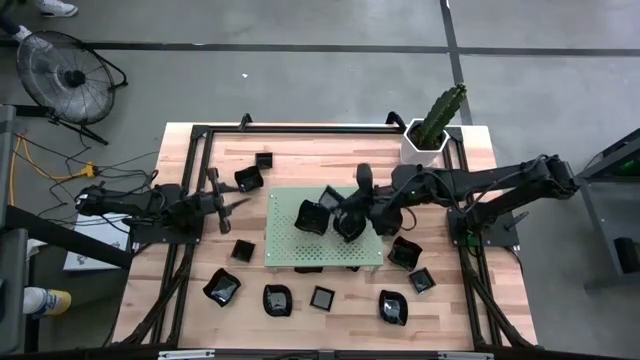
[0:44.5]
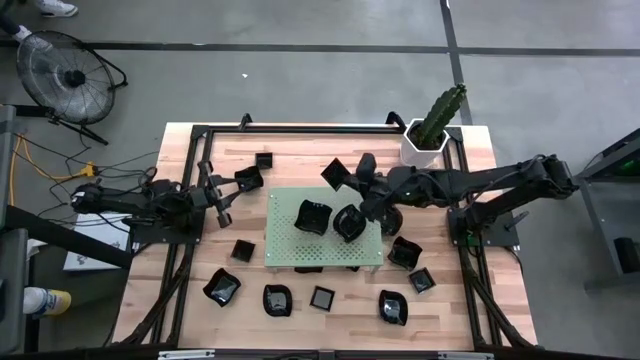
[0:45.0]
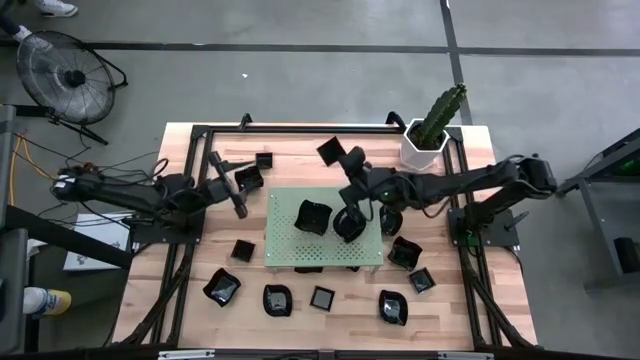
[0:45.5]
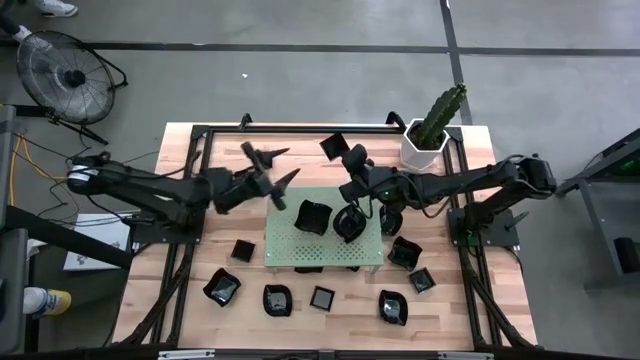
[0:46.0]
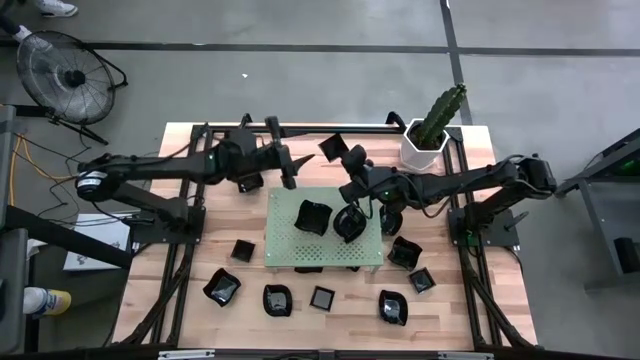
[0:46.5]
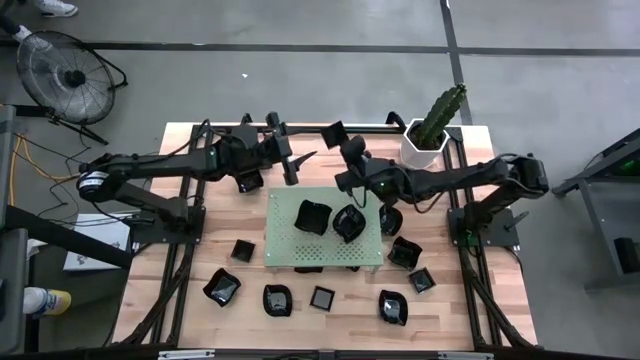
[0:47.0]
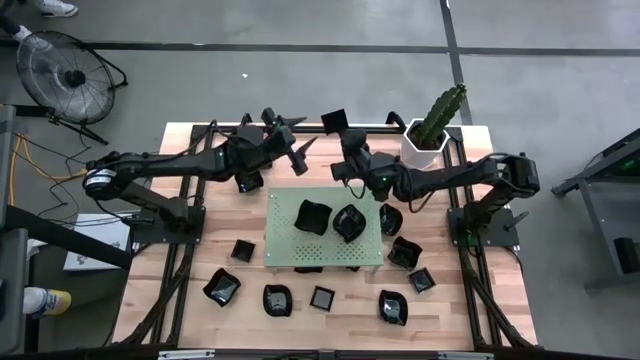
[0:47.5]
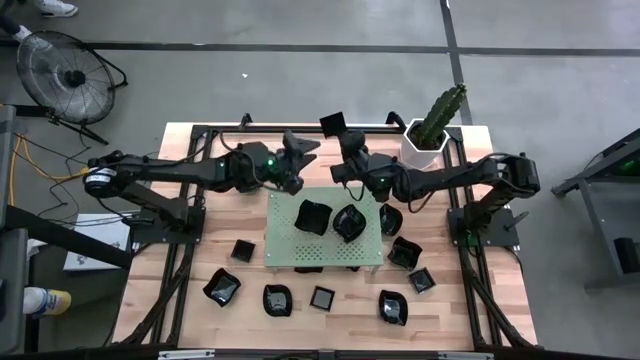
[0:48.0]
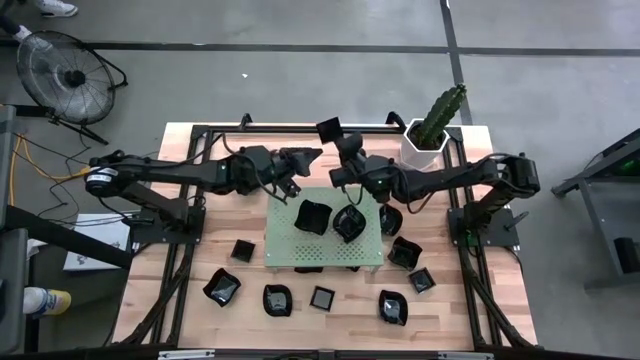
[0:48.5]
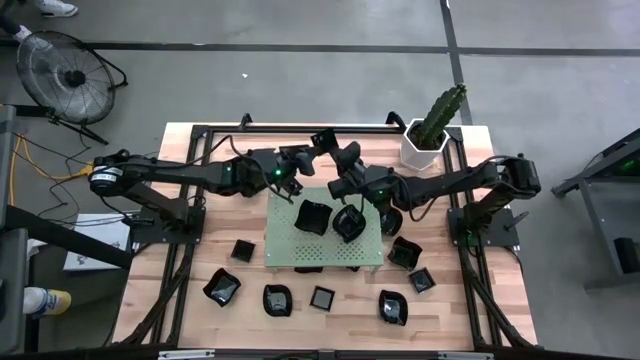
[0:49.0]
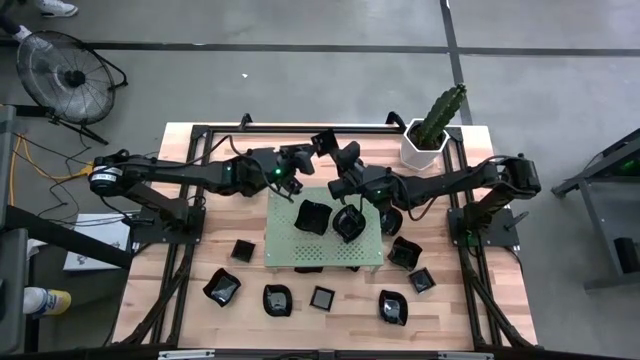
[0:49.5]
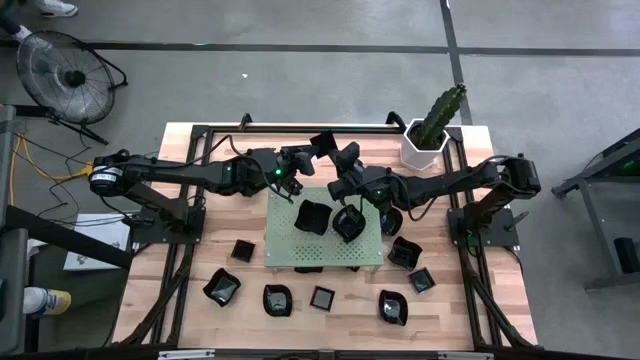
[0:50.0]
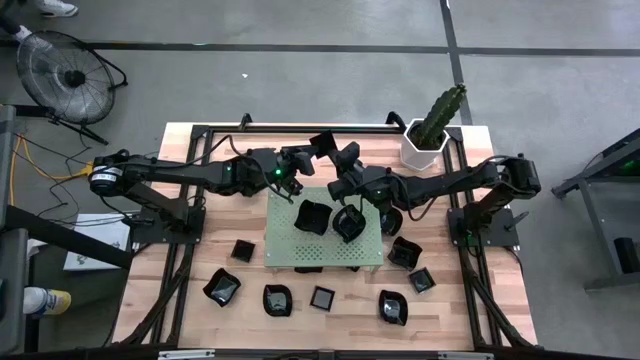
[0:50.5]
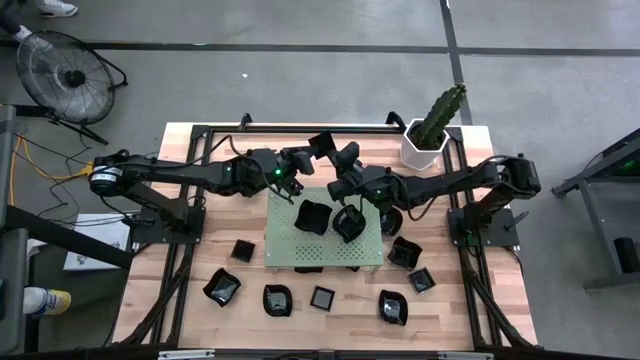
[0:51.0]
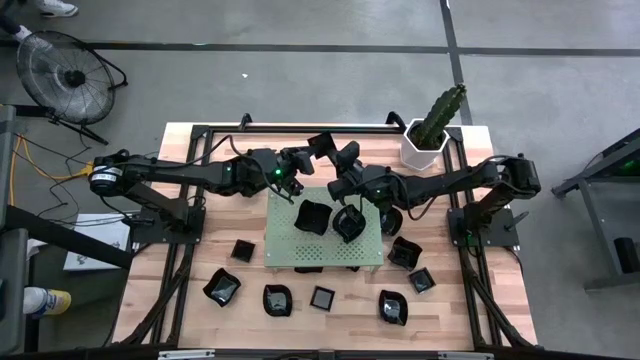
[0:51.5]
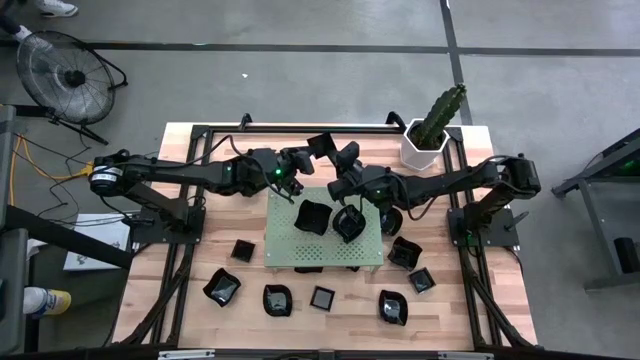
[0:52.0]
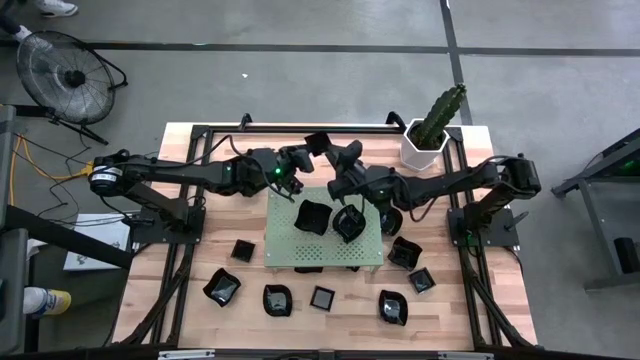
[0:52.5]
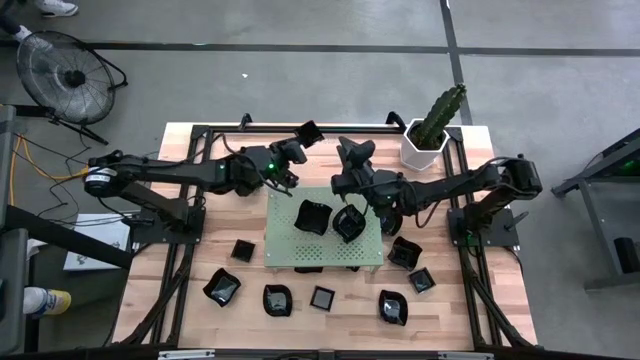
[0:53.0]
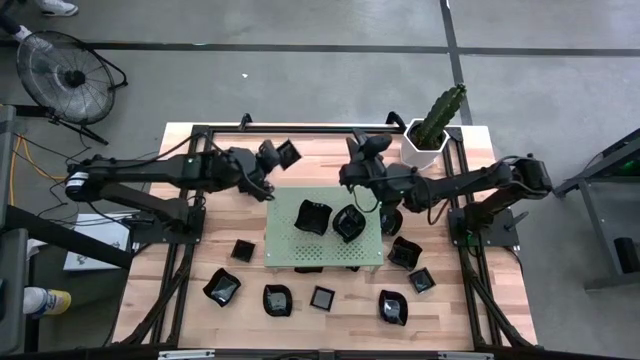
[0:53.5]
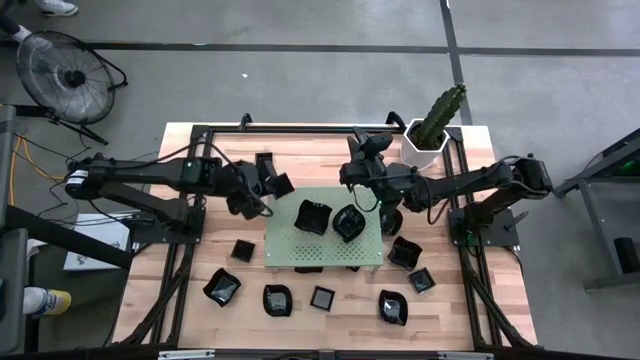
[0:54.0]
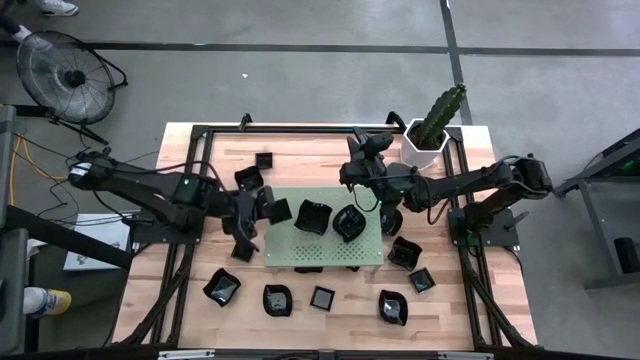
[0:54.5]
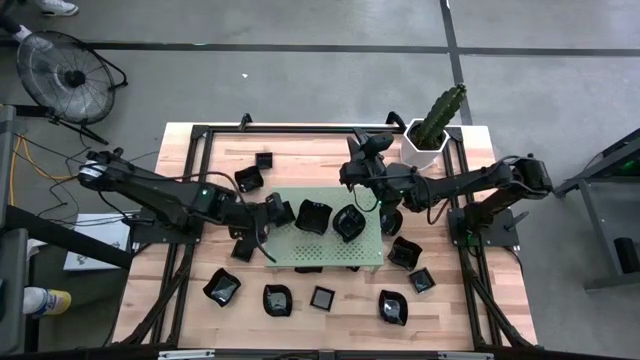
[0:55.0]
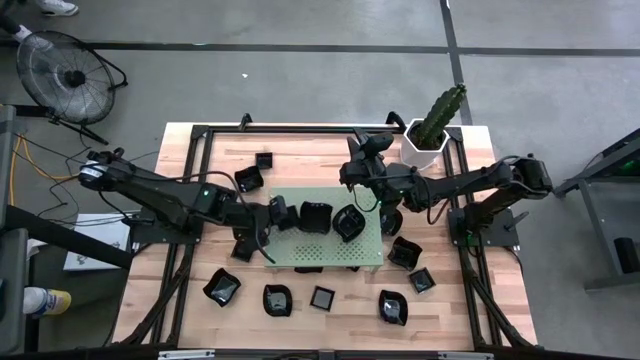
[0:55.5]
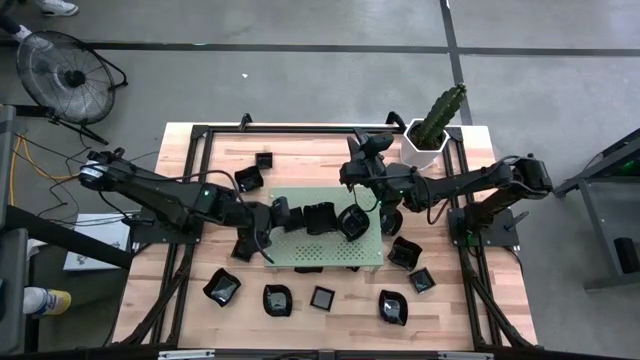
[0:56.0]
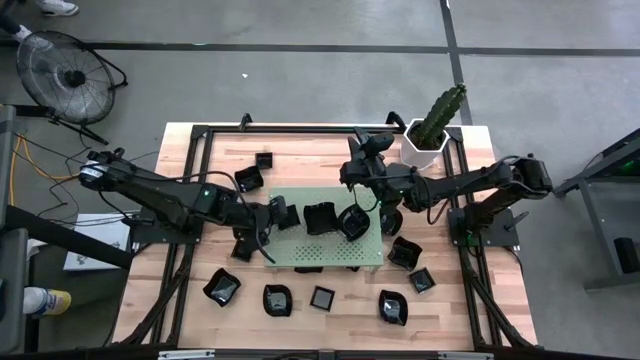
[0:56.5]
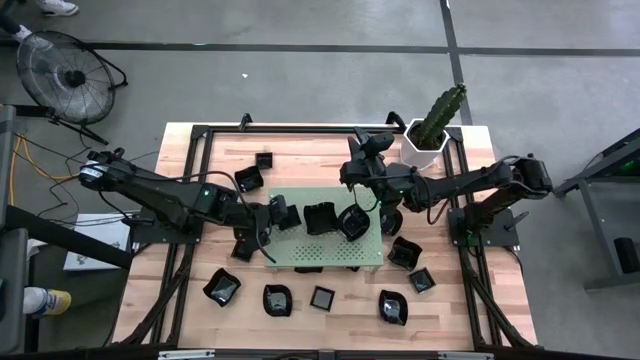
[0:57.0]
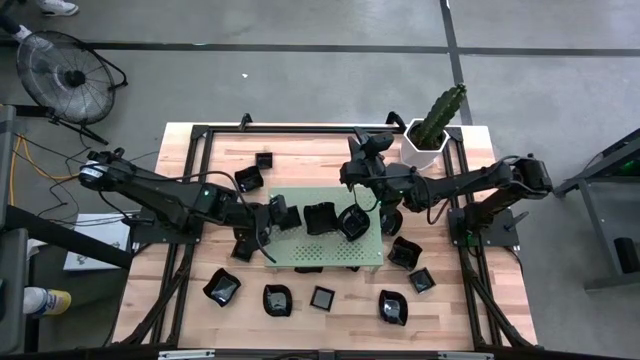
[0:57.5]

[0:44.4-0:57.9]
Task: Pick & Place Mini shaped plates
Put the black square shaped plate on the shelf

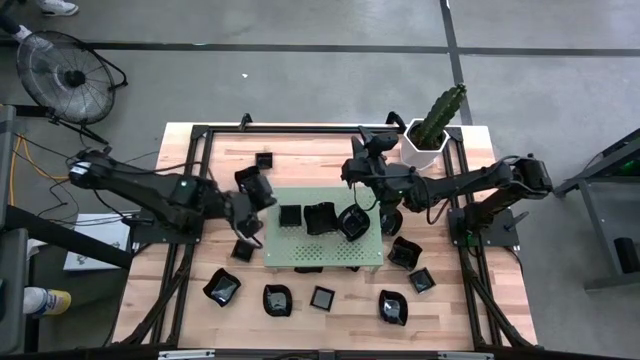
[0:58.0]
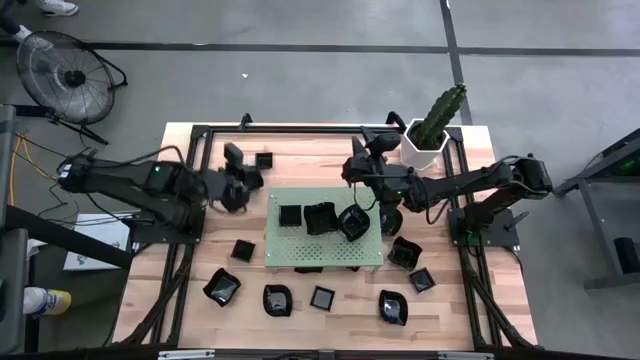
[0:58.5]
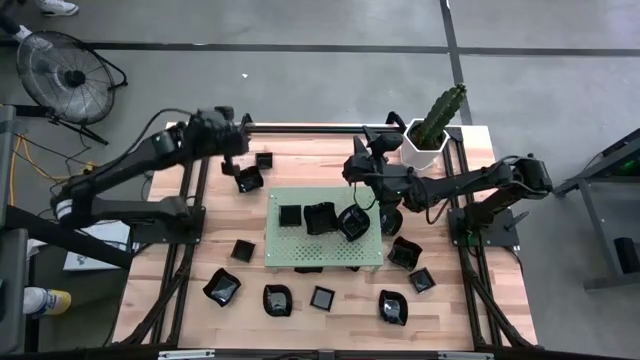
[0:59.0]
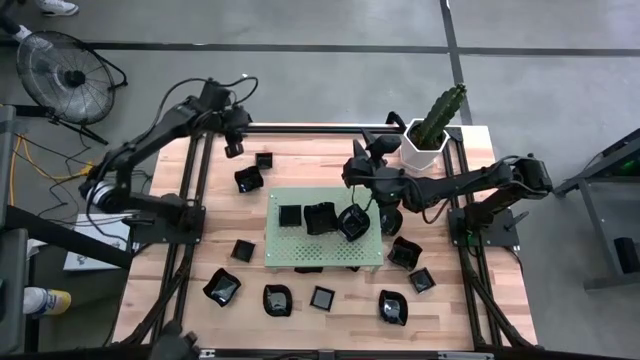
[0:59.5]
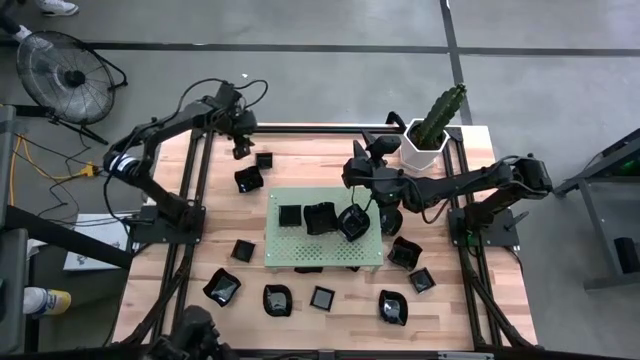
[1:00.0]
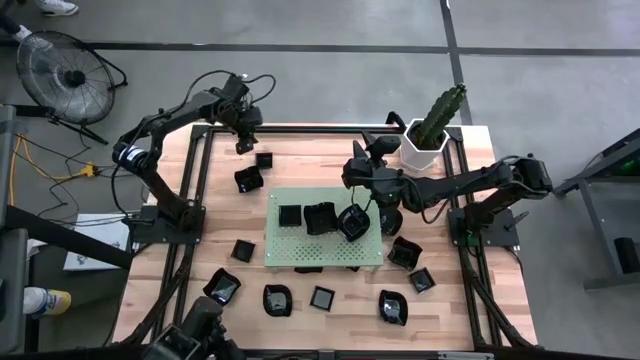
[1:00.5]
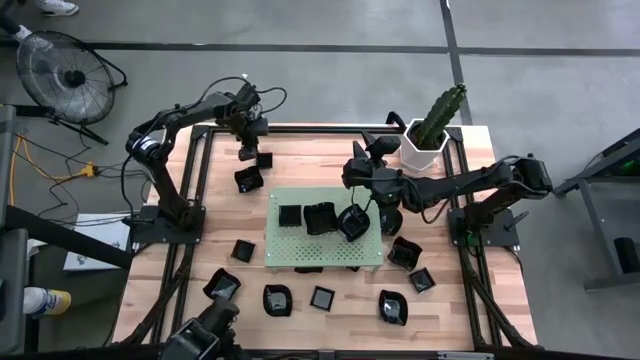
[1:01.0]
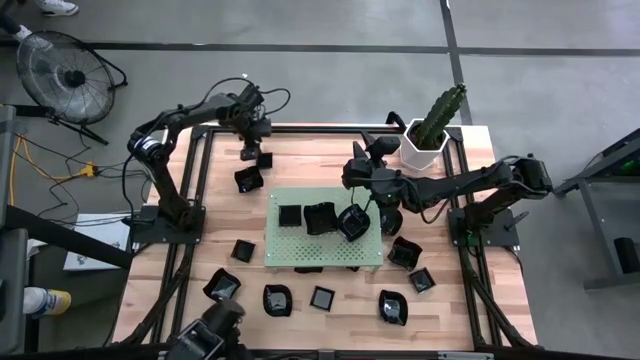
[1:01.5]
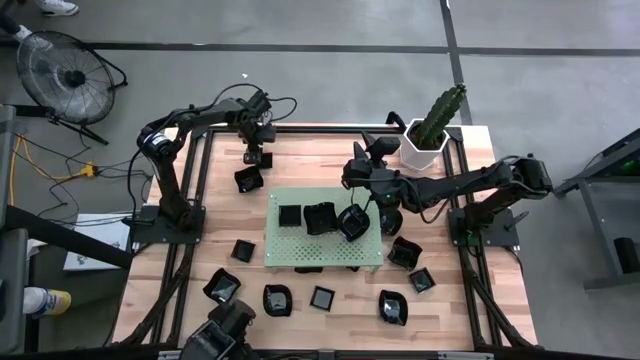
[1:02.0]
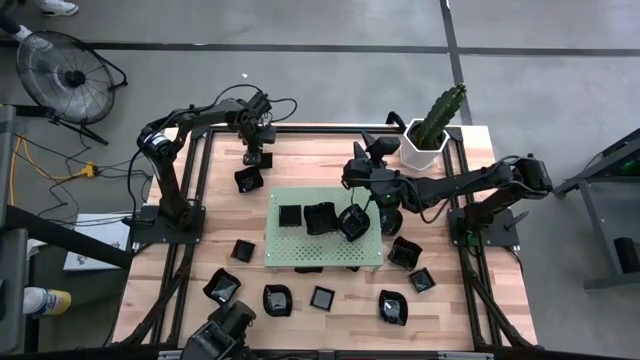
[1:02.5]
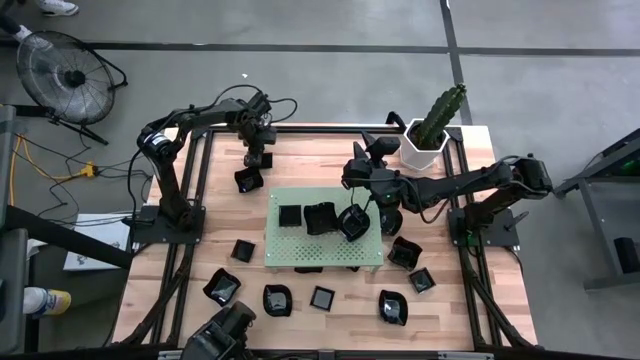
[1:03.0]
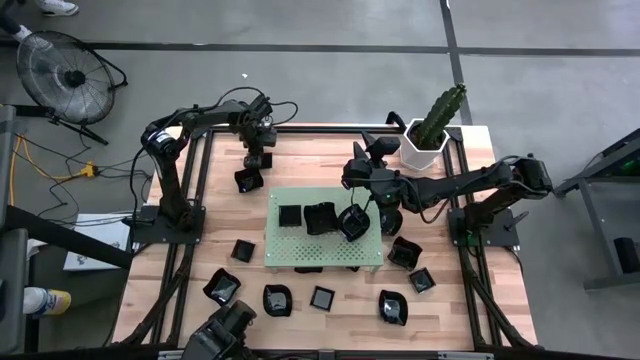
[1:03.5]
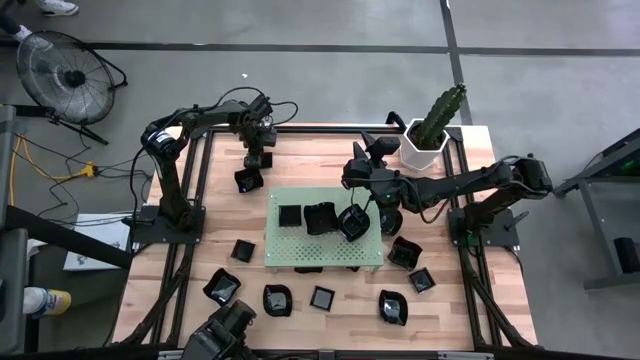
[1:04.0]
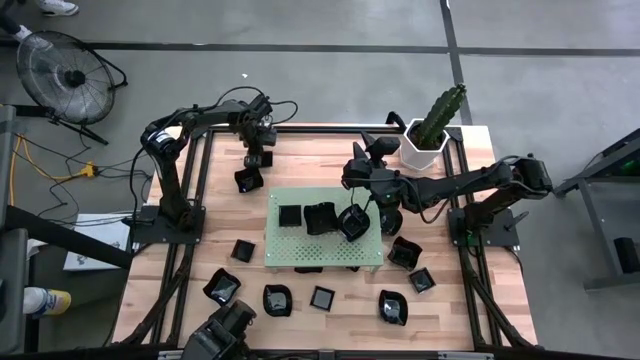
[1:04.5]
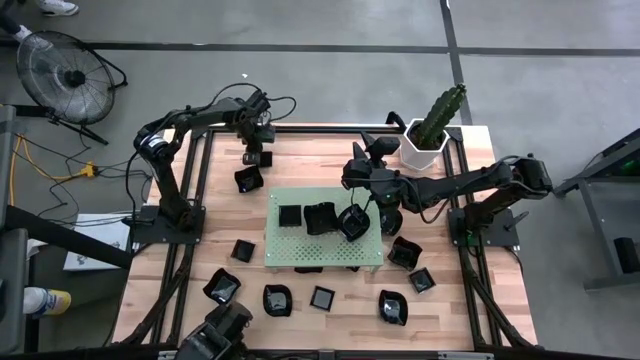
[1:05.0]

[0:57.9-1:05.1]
Stack the black square shaped plate on top of the black square shaped plate on the shelf

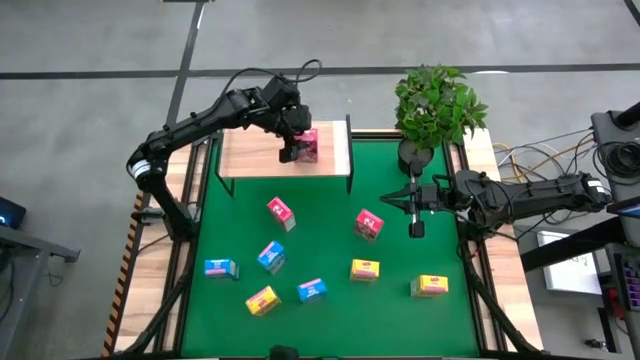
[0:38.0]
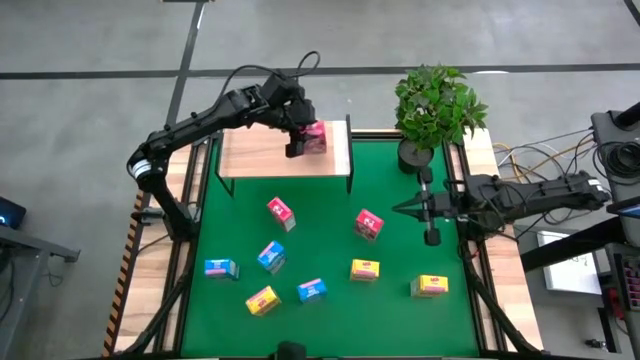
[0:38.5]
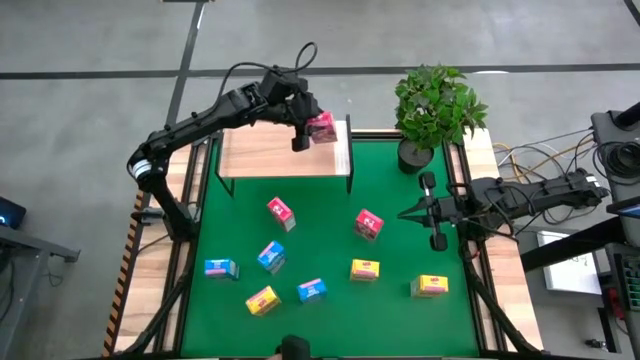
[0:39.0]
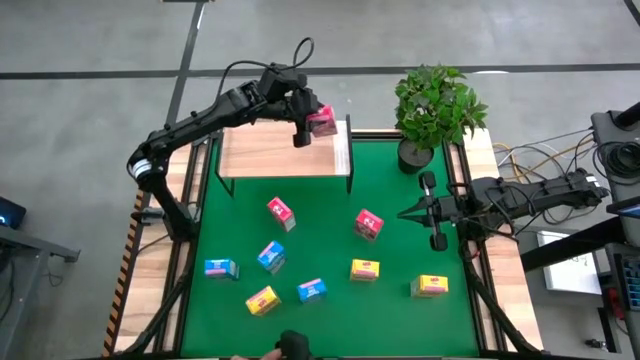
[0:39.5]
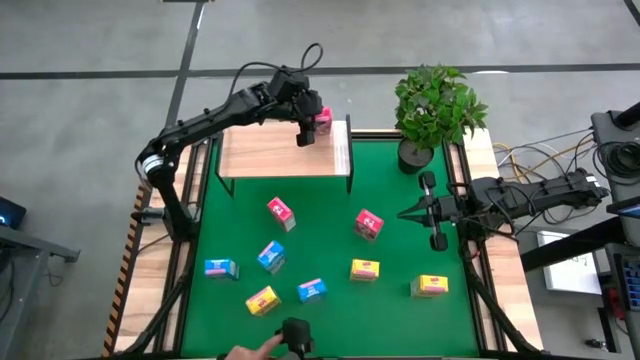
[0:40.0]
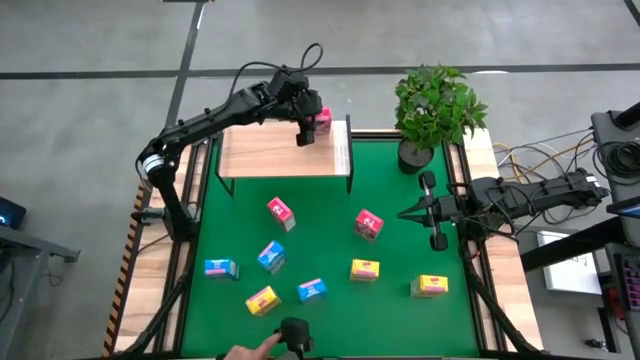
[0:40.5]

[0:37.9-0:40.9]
Task: Stack cereal on shelf
Adjust the red cereal on the shelf
